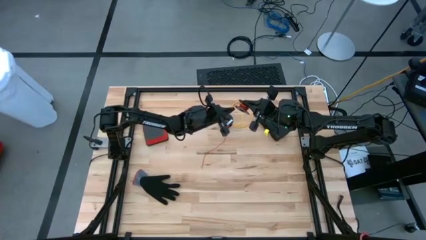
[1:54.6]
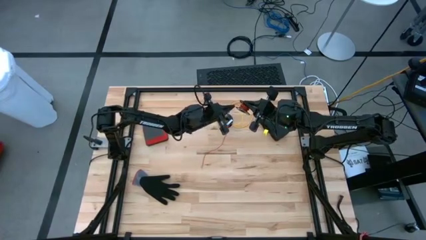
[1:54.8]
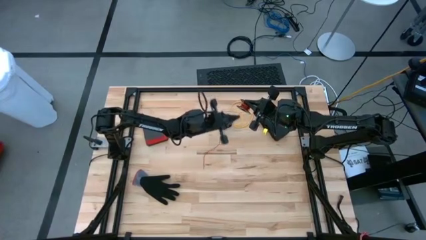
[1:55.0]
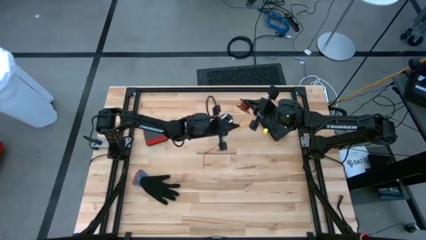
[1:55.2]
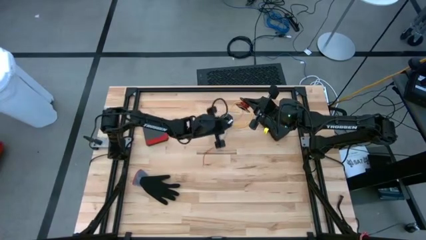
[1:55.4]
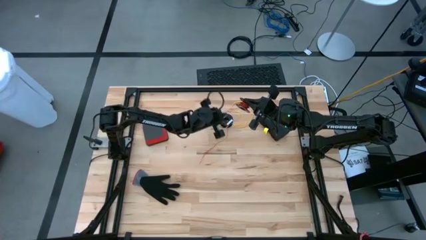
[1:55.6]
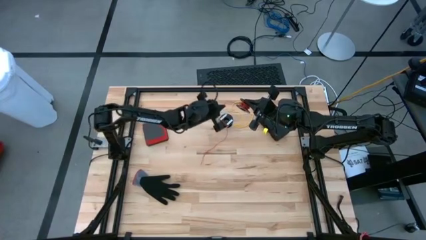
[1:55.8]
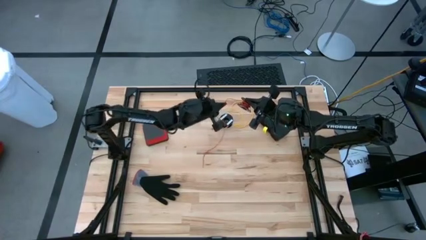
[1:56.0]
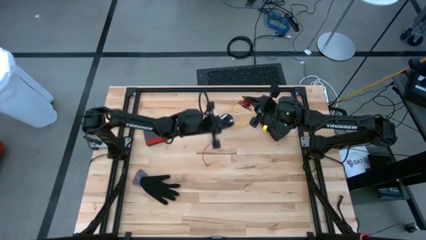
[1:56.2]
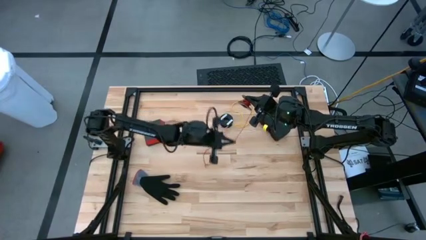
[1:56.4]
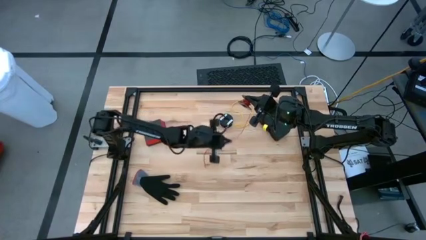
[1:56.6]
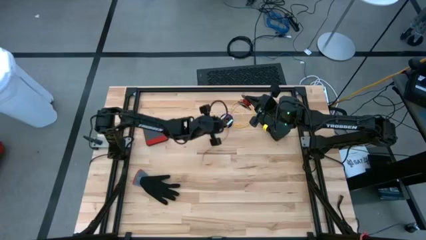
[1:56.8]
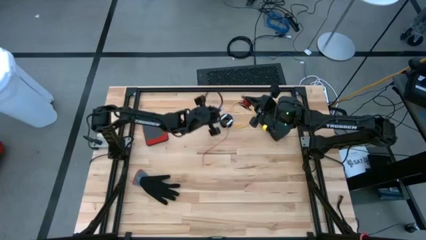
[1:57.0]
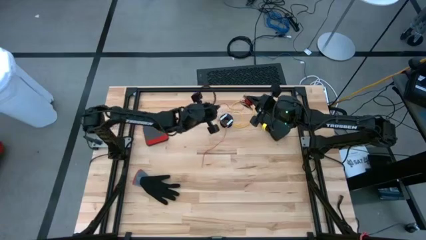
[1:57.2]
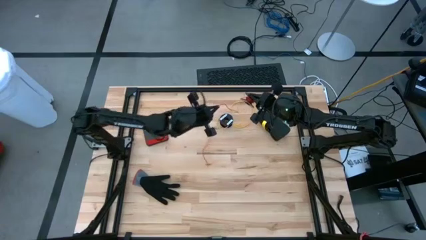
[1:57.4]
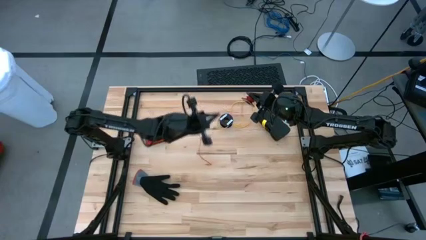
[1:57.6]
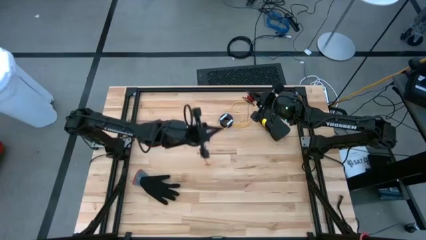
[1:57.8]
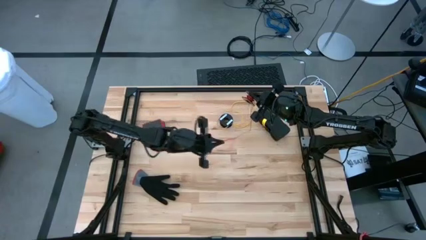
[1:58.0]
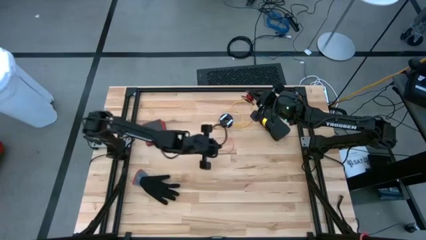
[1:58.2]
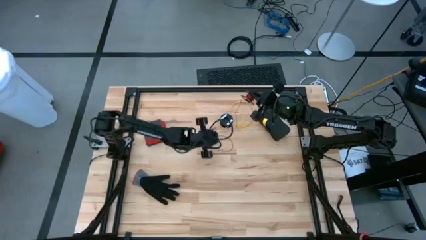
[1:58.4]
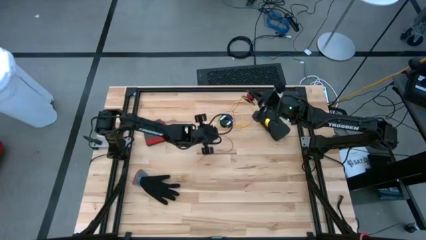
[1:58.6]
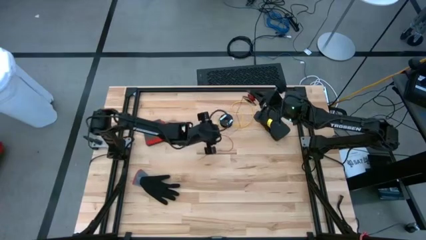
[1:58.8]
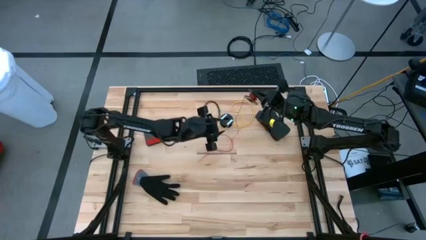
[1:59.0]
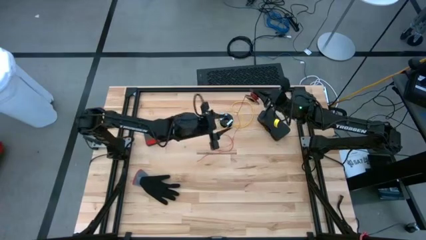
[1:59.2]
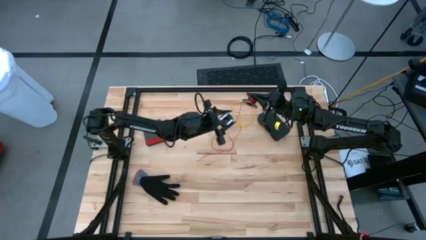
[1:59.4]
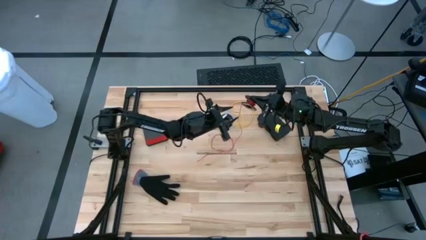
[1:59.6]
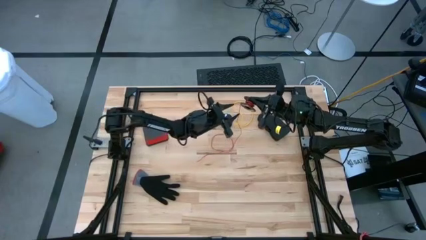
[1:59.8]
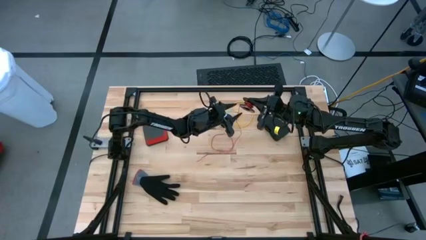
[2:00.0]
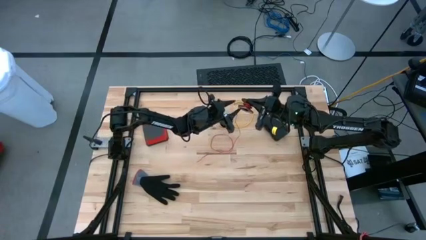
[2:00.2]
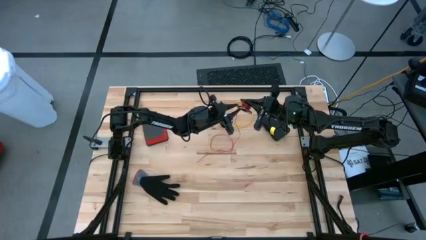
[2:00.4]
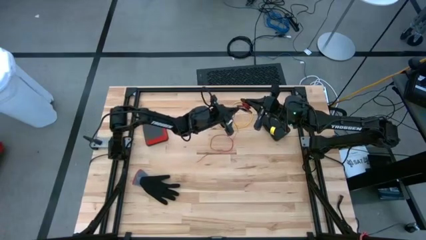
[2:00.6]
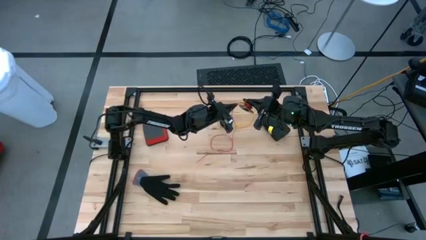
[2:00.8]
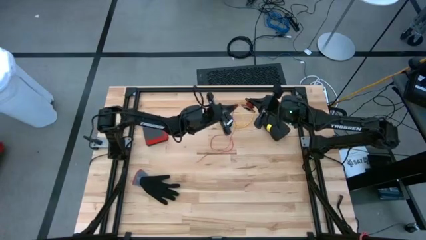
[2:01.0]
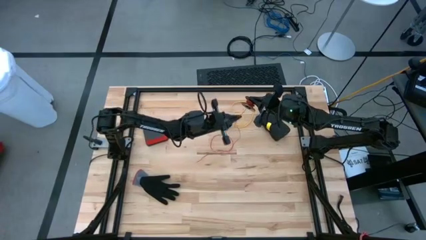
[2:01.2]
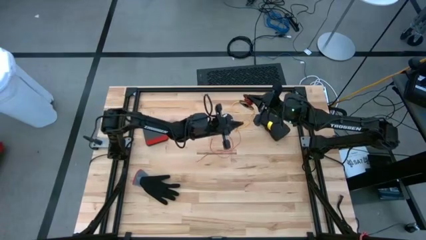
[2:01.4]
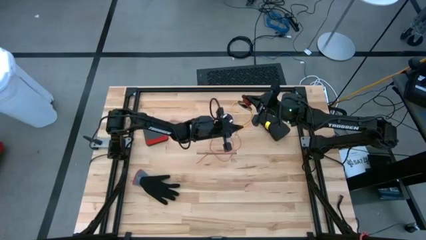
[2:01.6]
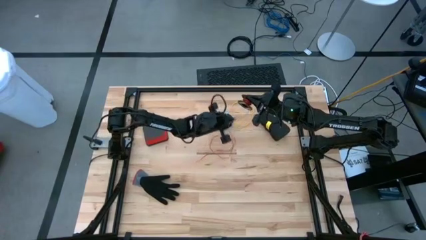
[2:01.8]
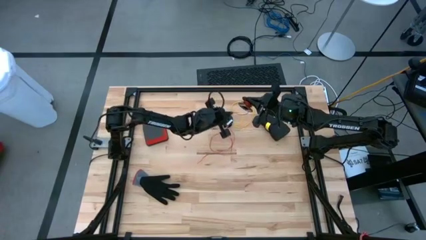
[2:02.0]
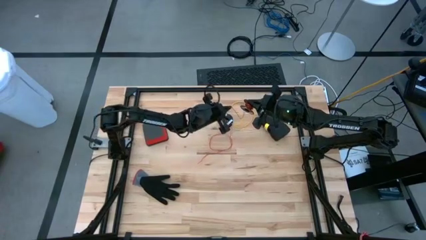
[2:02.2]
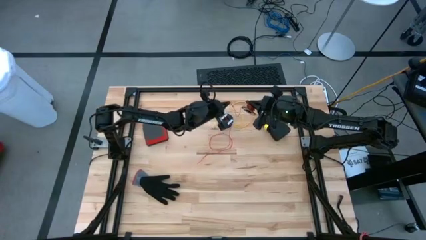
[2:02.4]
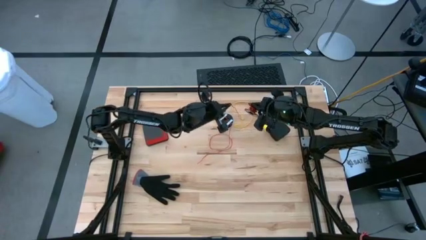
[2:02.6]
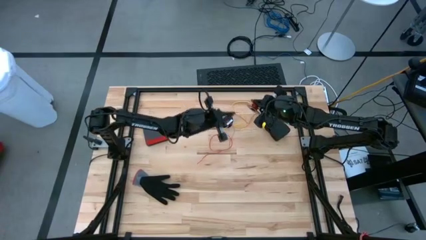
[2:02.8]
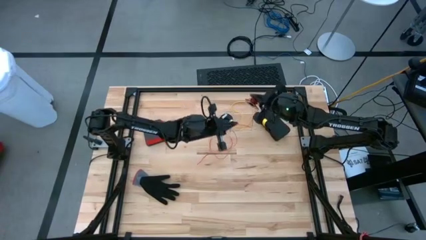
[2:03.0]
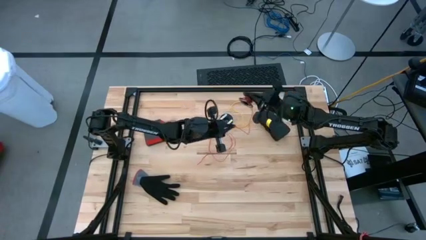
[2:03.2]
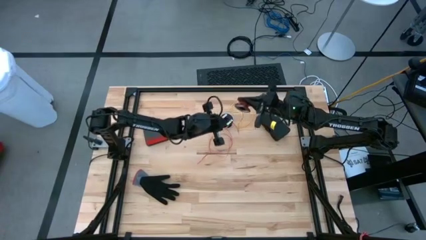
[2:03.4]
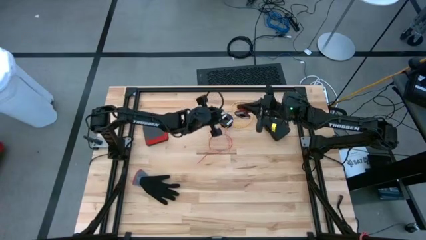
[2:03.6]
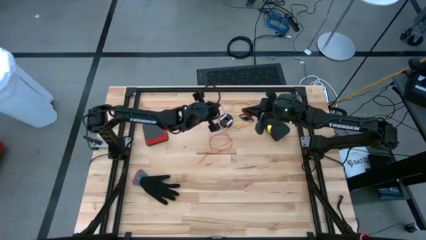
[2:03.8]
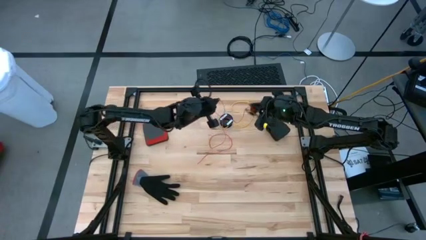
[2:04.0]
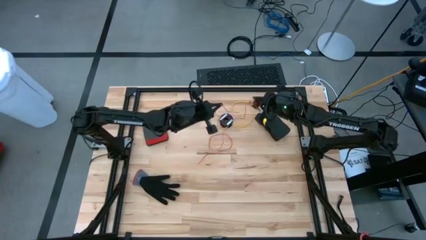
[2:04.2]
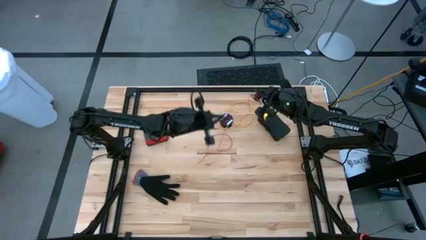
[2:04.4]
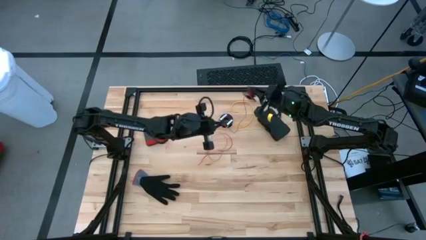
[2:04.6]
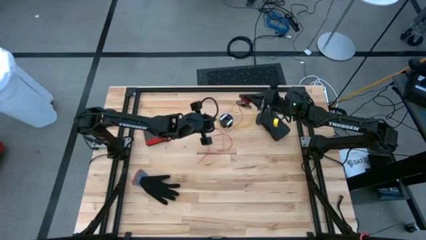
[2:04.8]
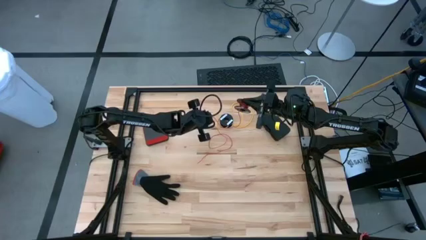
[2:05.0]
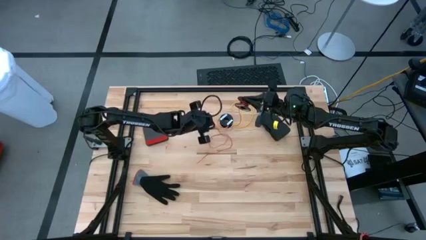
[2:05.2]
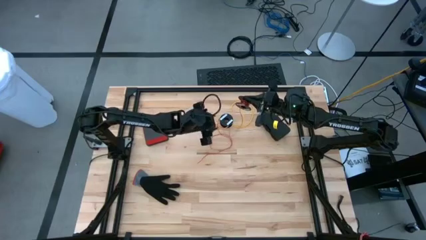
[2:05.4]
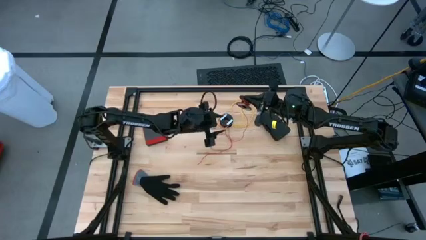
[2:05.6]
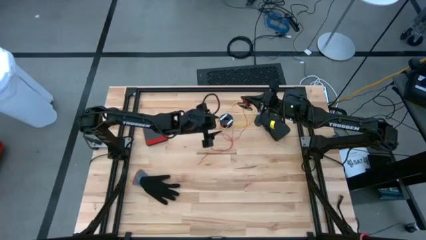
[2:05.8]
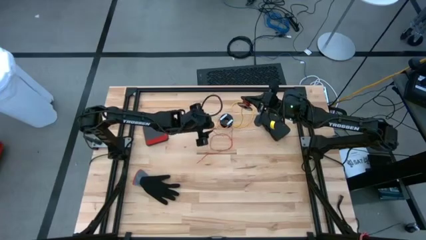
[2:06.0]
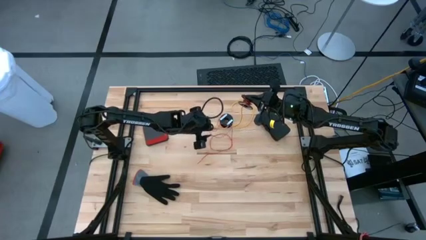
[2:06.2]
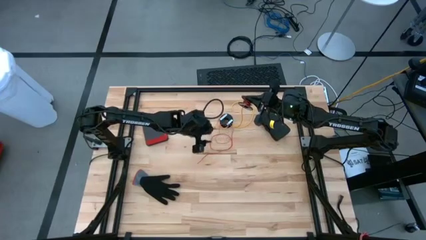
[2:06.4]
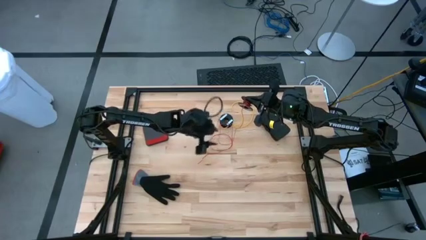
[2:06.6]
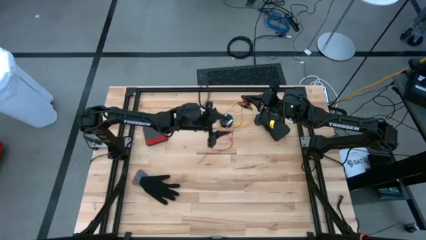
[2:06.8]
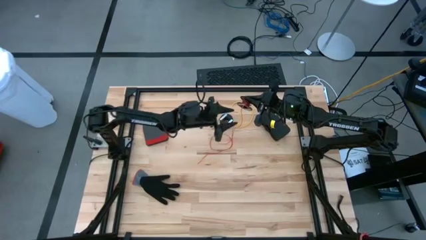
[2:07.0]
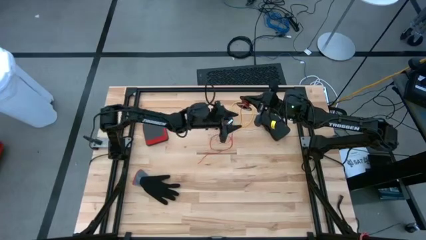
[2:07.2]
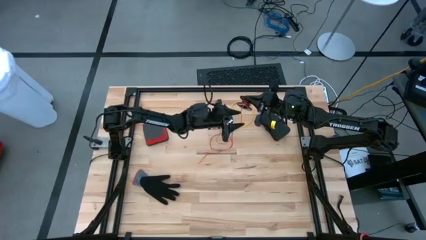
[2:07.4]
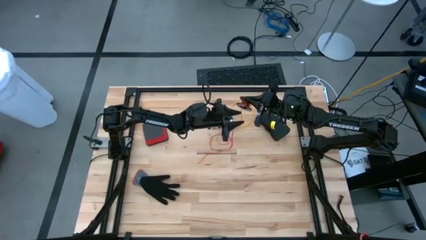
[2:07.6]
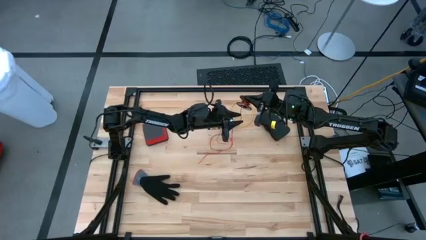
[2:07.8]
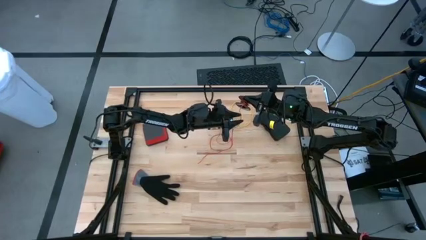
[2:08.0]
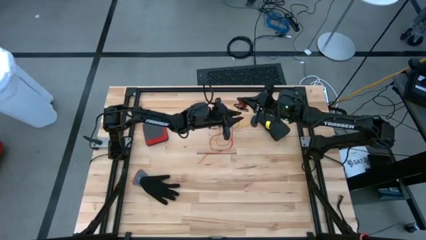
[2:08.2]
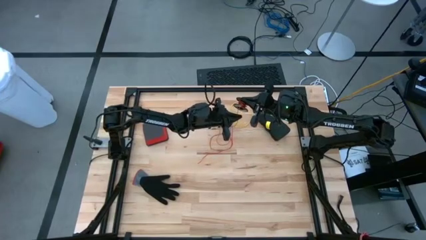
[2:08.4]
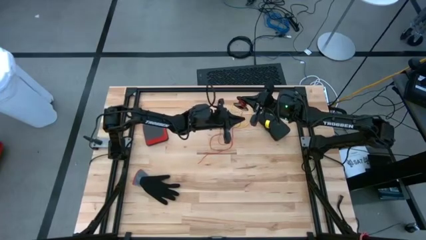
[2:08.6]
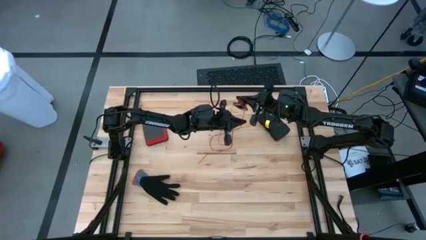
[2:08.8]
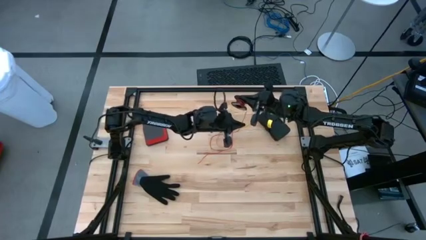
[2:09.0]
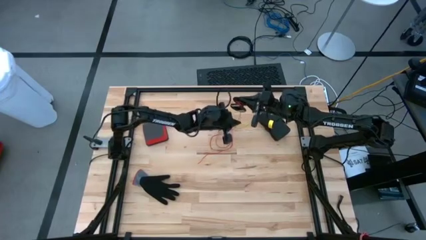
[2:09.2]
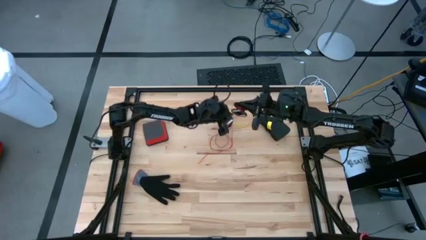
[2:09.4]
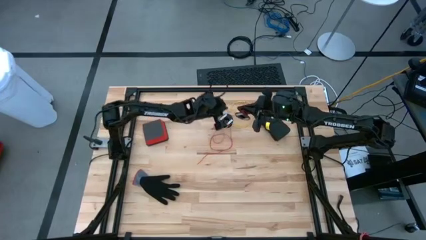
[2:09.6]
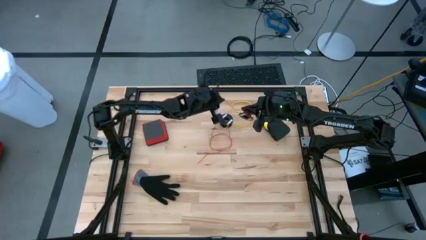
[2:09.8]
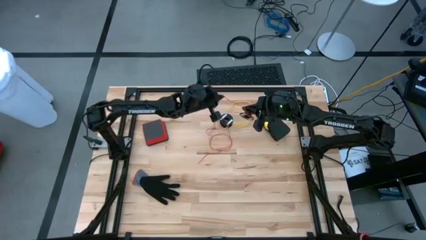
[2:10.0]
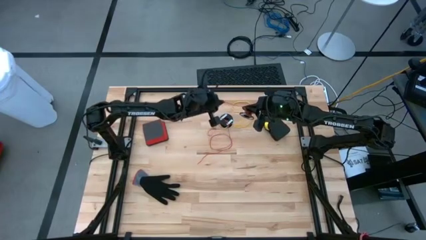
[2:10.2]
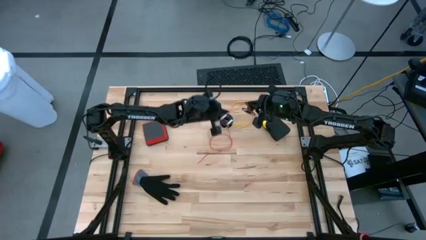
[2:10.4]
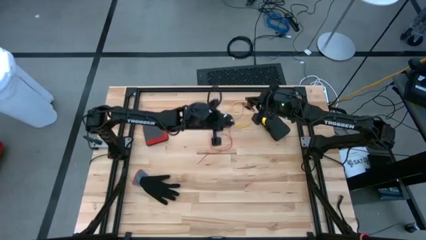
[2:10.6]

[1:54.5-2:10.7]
Task: Coil cords
Uncoil the red wire from the spool
